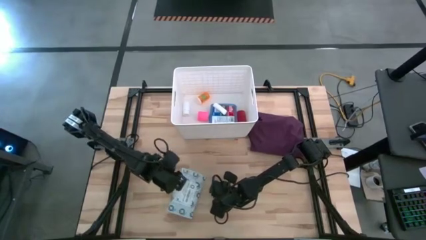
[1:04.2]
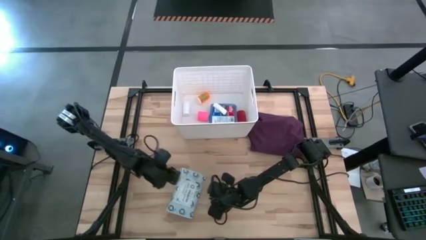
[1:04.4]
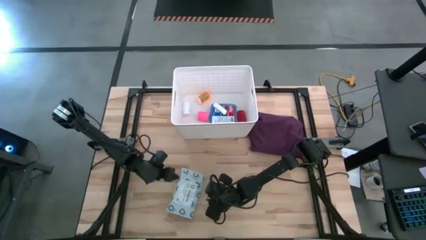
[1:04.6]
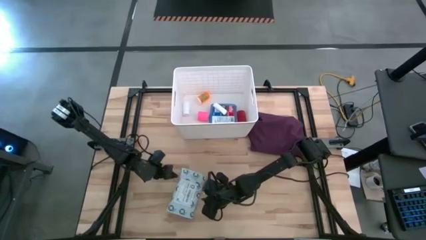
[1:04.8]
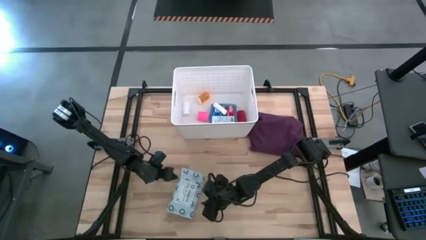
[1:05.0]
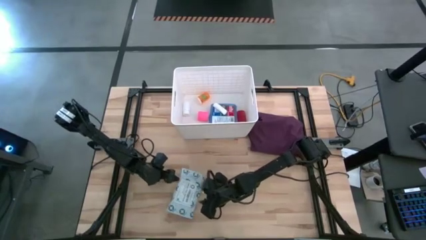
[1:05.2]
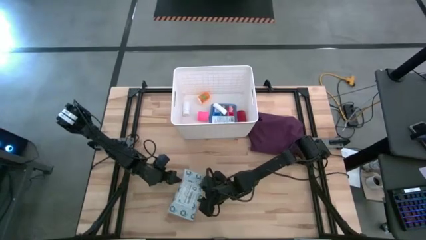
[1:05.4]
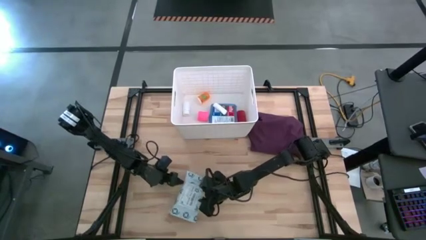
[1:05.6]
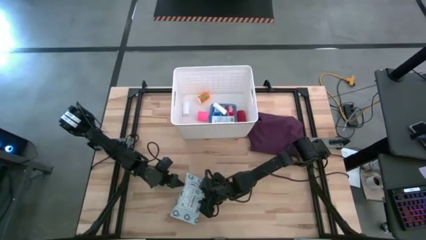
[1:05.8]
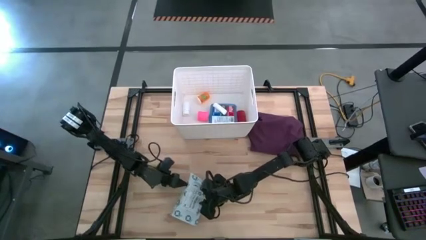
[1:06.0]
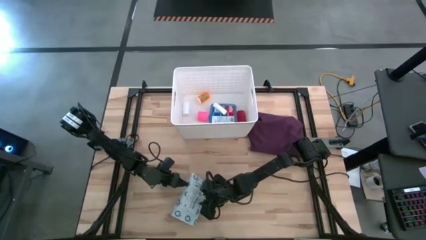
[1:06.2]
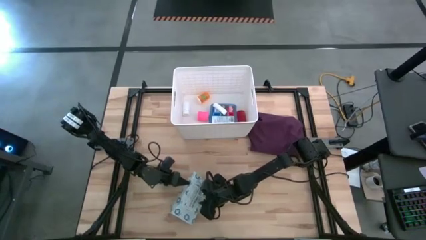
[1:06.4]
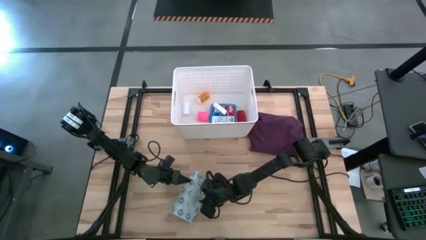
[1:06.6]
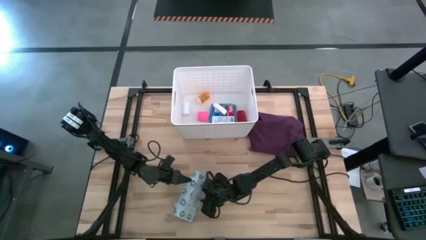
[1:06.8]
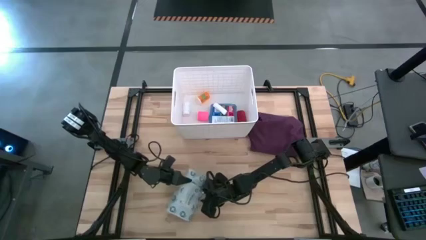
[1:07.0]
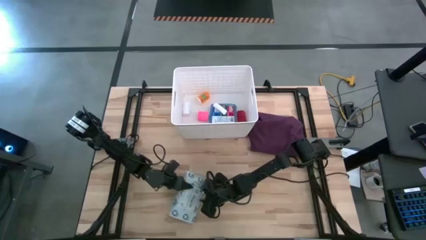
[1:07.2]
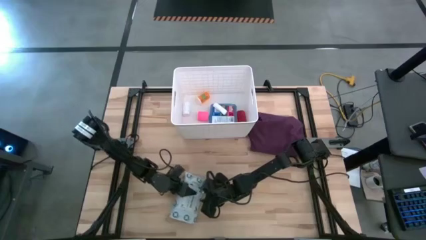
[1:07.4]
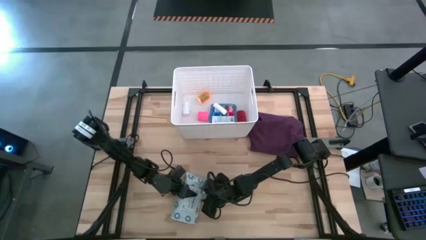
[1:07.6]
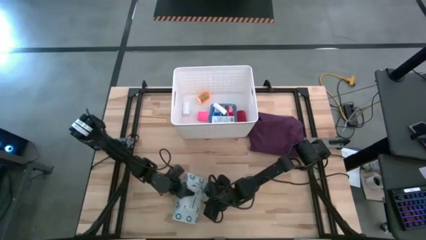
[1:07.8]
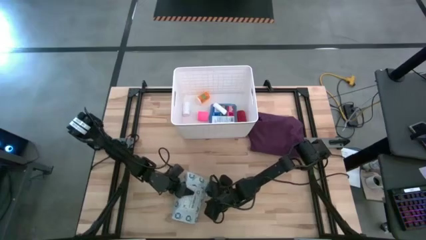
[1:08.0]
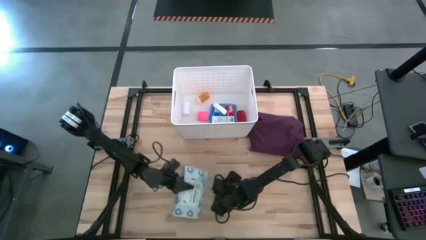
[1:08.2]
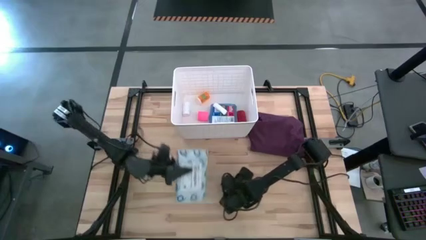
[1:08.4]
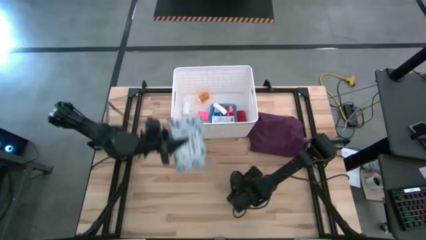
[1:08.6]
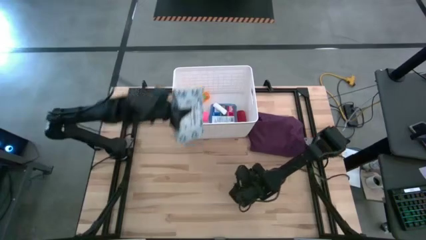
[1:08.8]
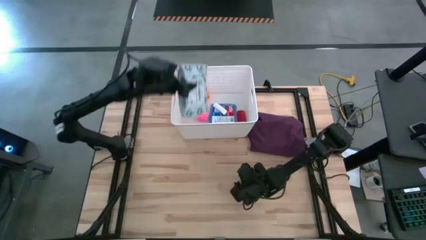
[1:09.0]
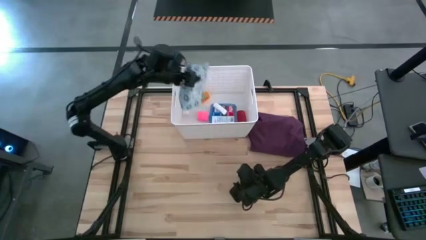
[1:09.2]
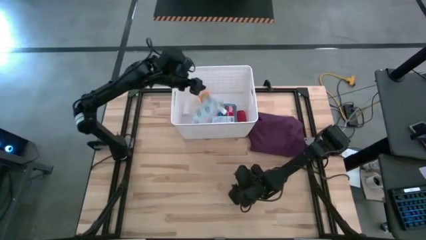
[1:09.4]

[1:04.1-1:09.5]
Task: Pick & place medical supplies in basket/bin
Put the white mailer bag into the white bin

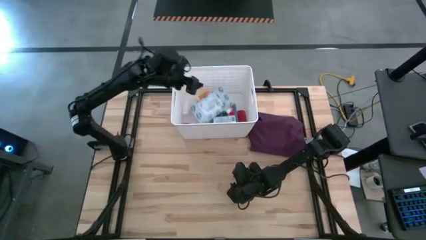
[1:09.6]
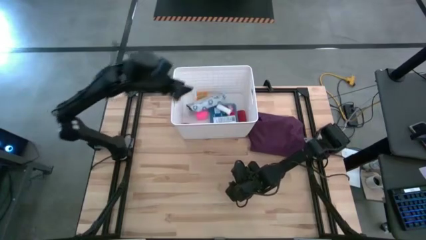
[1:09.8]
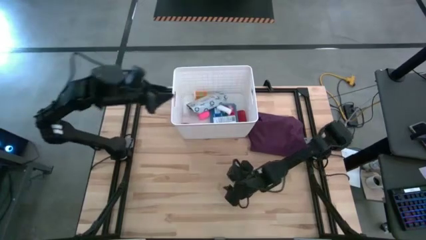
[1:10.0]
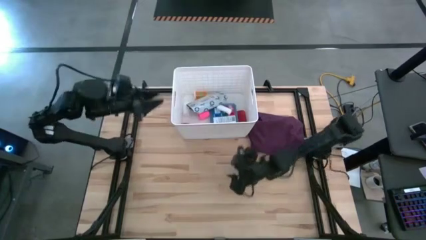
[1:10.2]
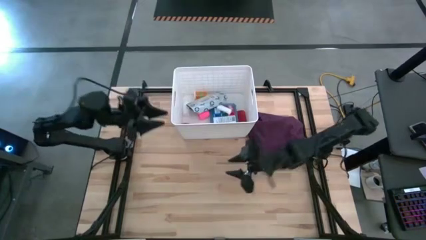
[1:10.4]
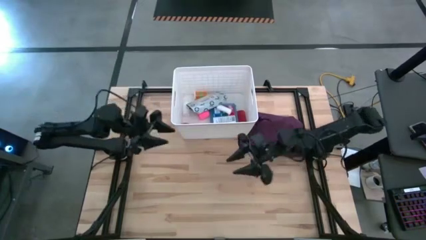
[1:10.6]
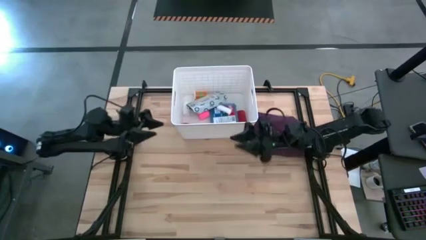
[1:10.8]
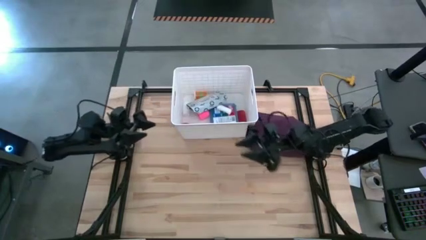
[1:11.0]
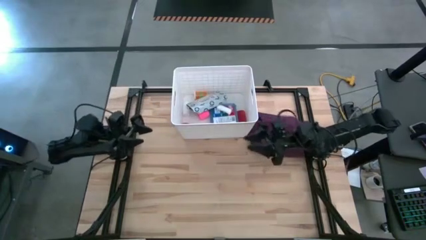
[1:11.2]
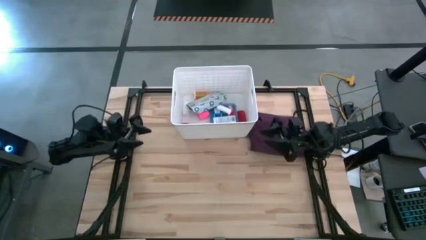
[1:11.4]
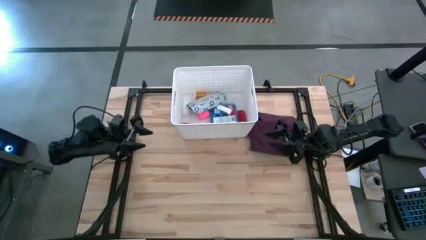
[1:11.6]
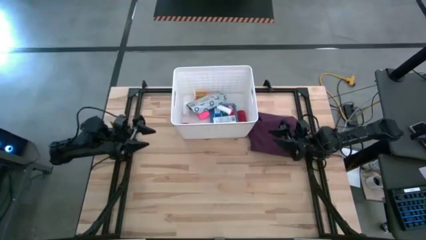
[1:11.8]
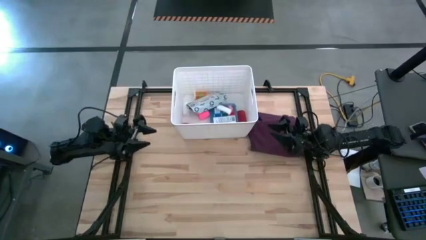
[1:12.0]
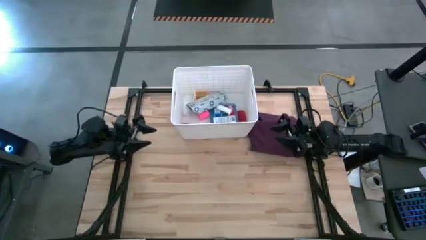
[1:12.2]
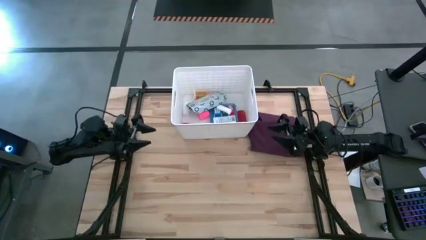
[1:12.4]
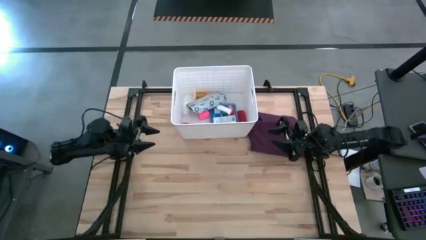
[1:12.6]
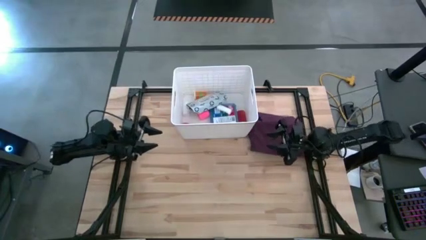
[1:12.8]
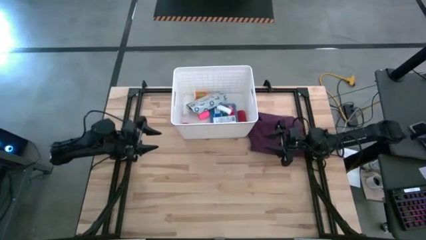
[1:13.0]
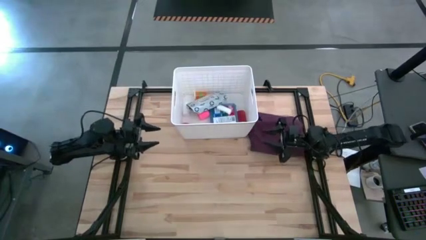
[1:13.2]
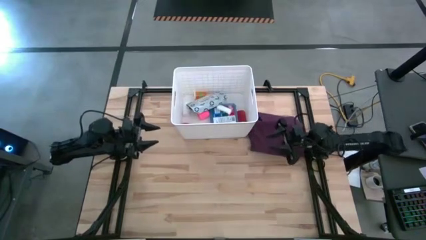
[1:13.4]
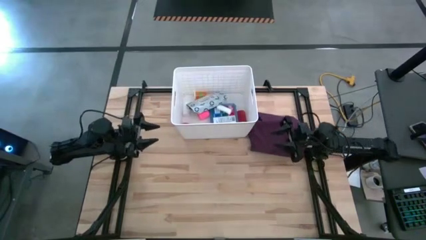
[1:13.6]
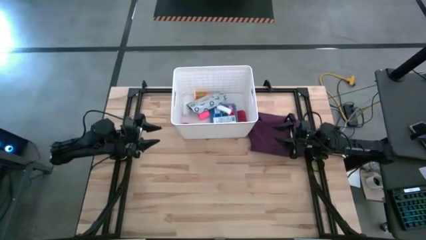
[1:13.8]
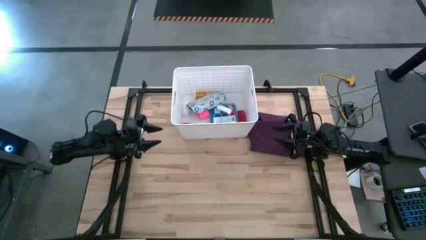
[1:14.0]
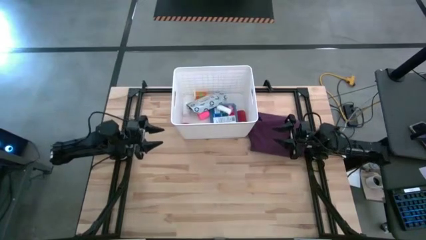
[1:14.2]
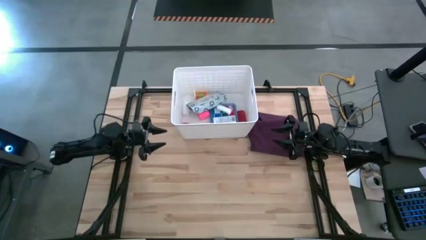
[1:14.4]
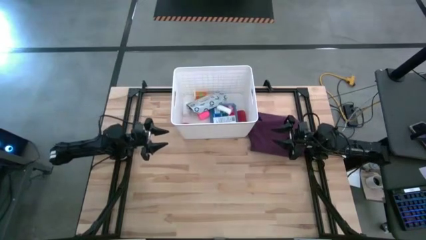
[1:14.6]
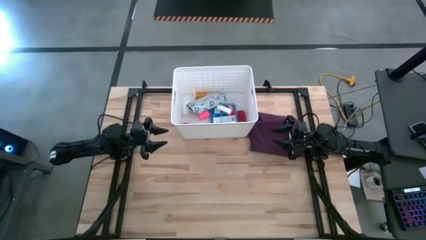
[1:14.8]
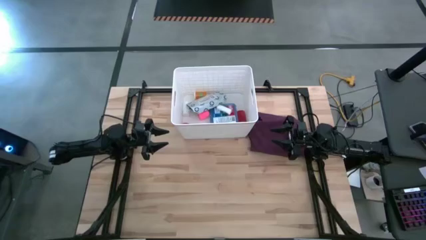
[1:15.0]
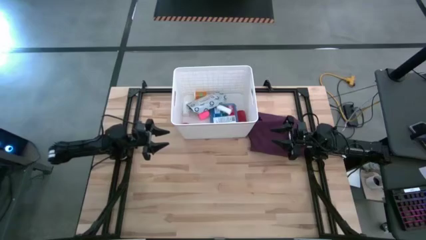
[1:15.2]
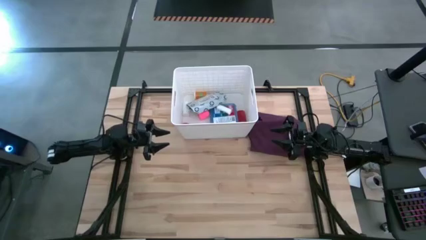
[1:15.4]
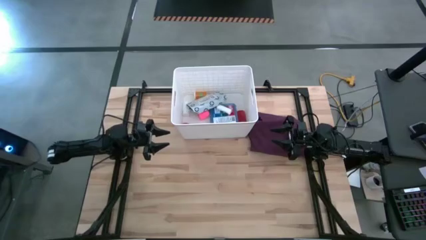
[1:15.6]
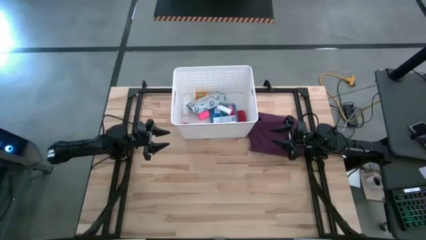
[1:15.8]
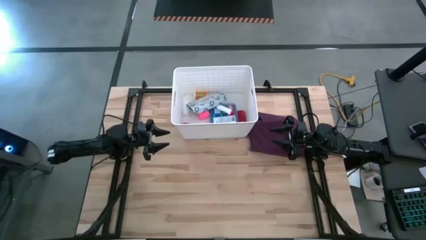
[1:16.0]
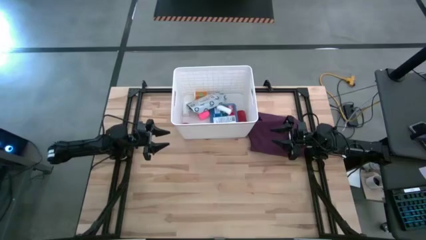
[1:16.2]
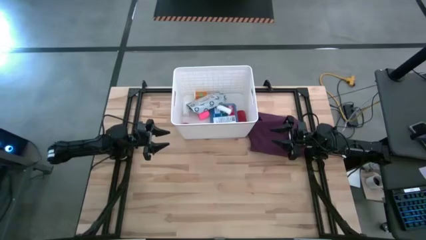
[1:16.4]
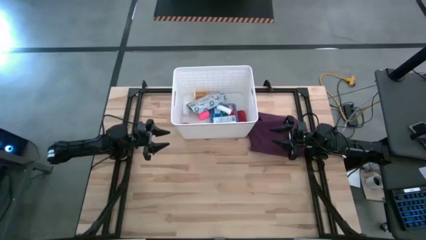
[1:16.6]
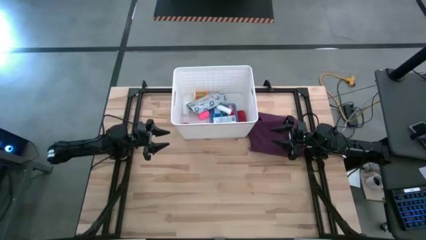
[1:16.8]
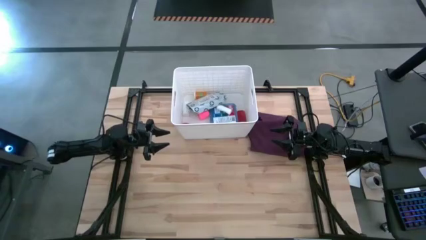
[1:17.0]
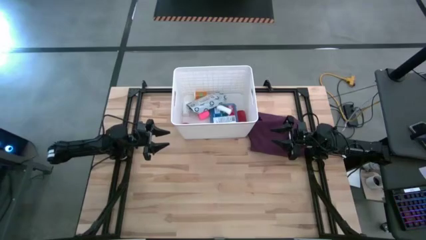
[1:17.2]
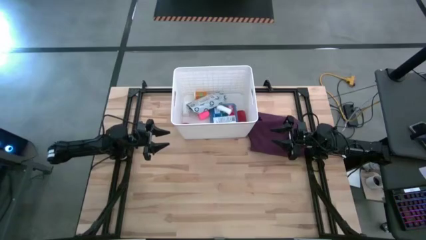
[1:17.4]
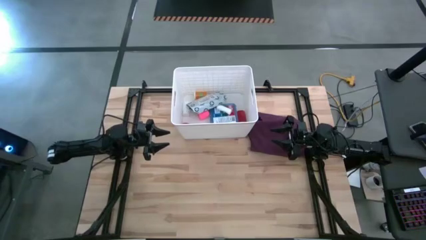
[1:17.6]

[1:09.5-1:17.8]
Return to Home Position
